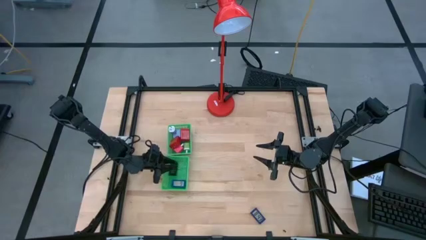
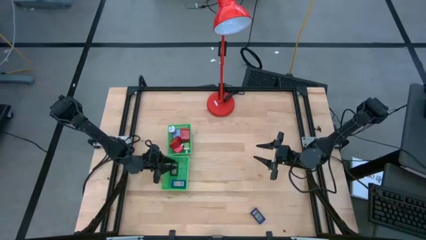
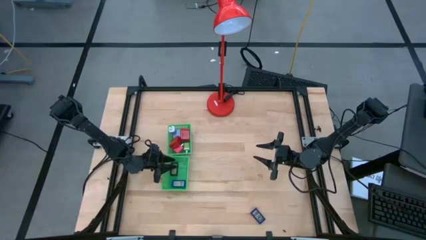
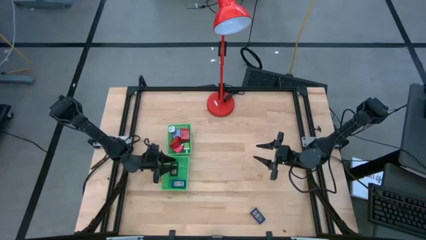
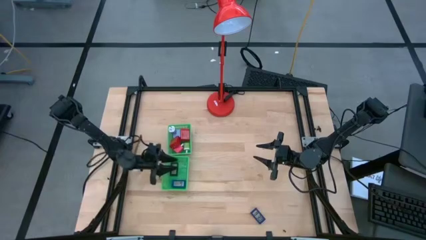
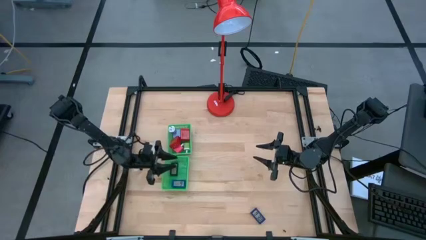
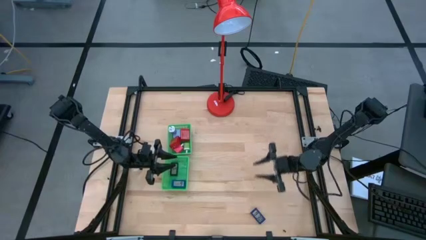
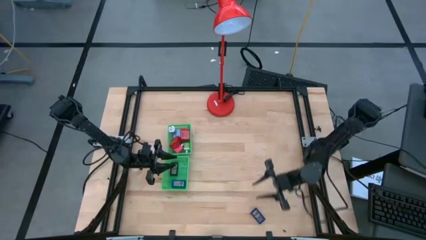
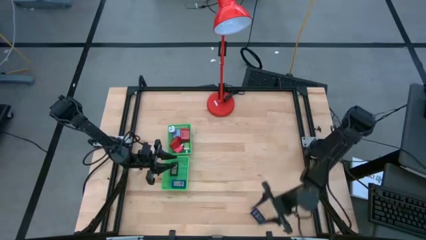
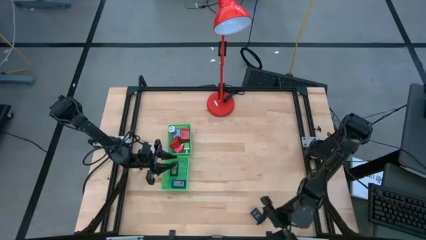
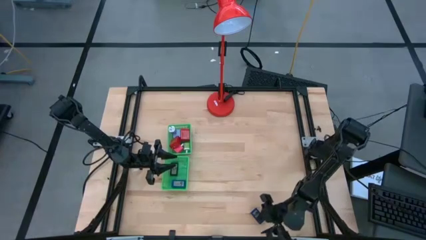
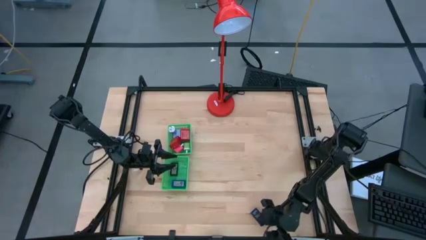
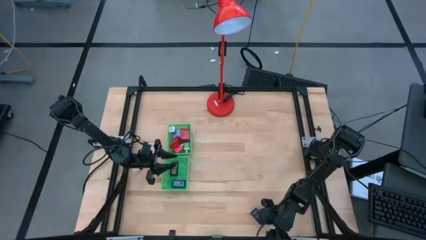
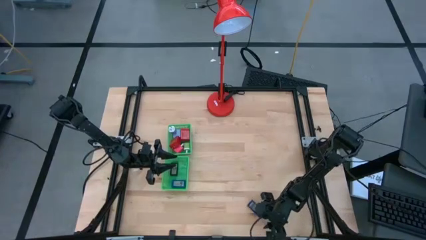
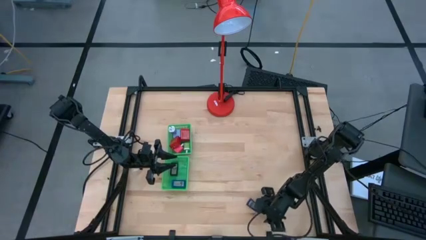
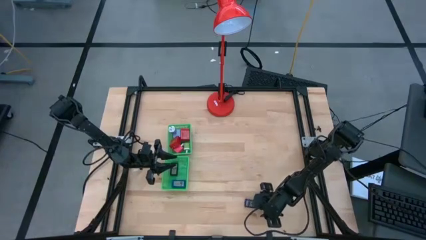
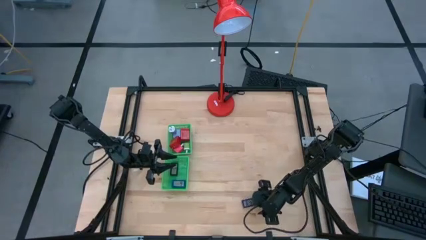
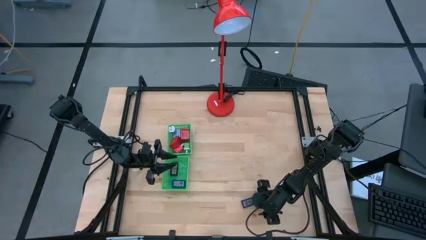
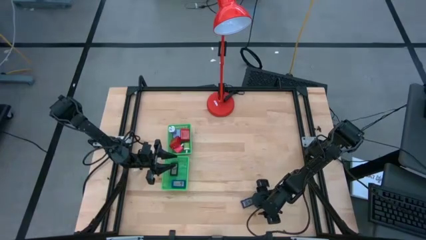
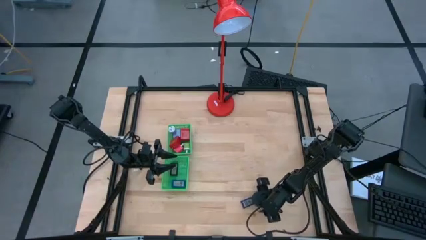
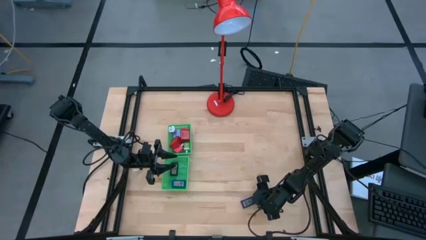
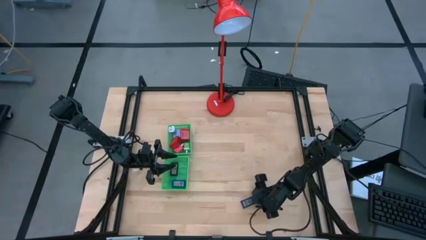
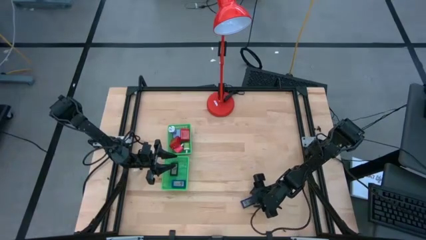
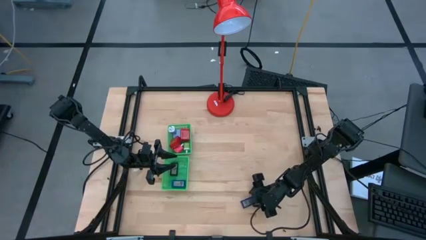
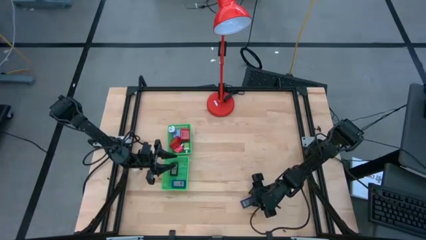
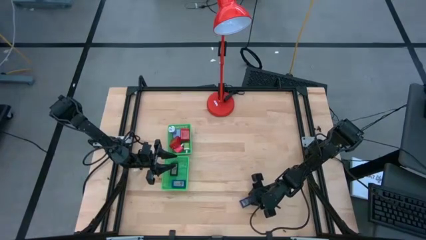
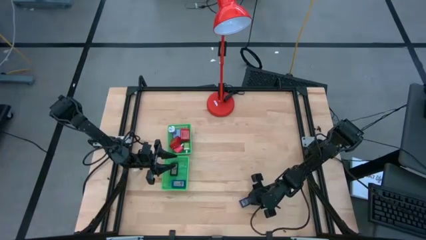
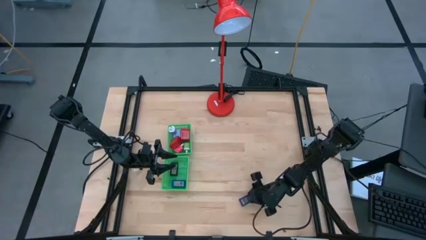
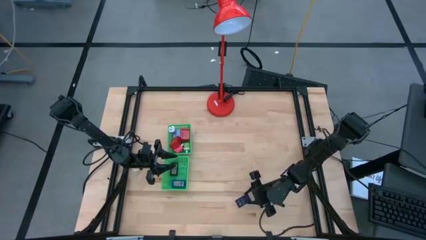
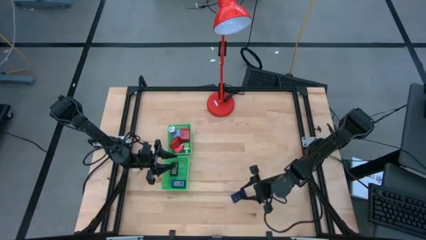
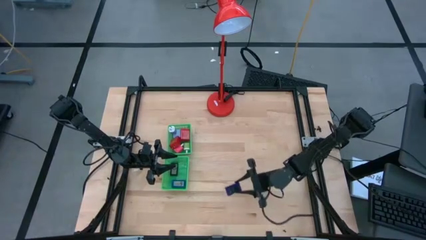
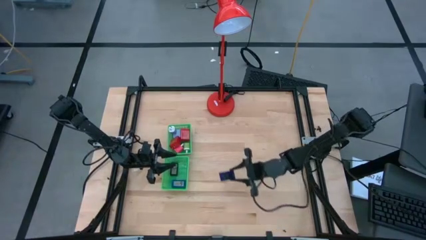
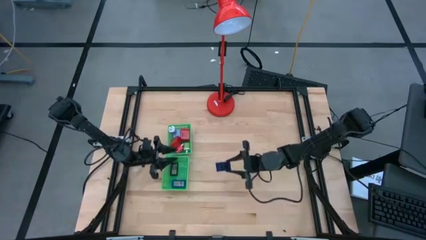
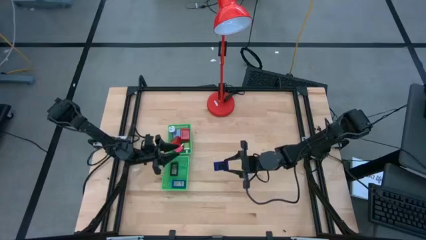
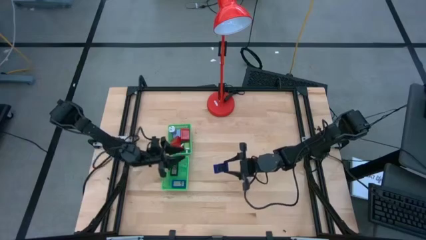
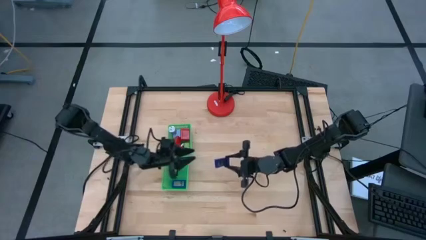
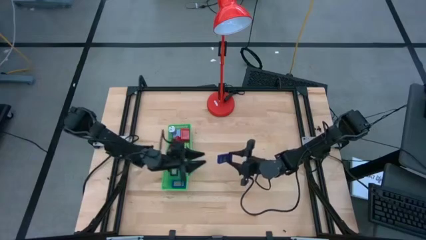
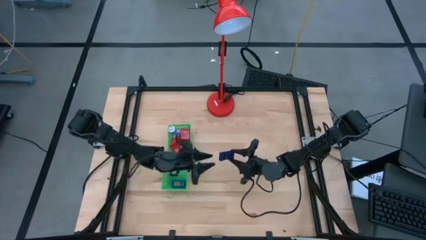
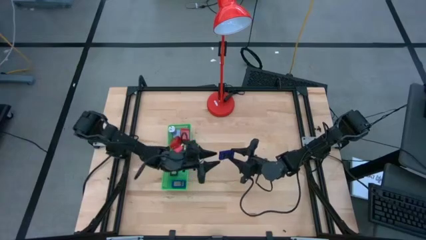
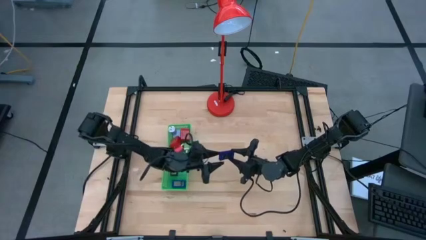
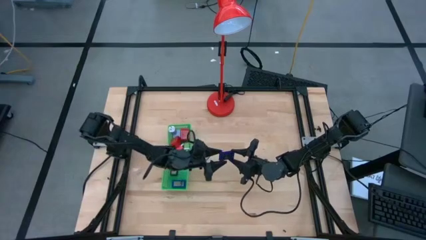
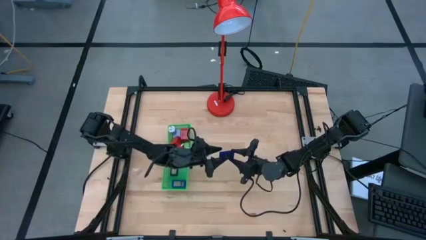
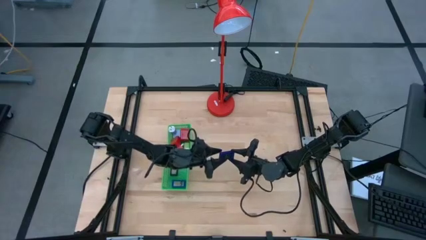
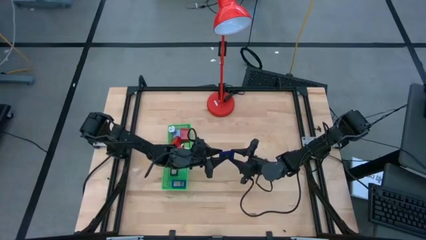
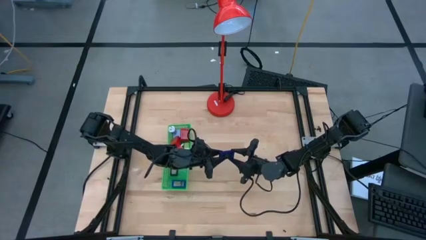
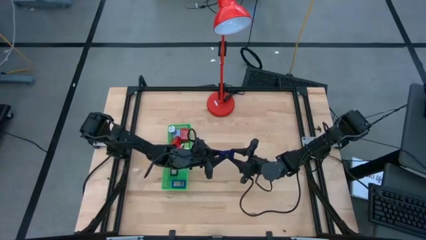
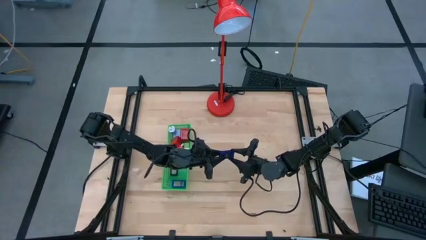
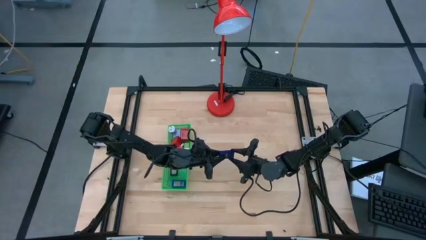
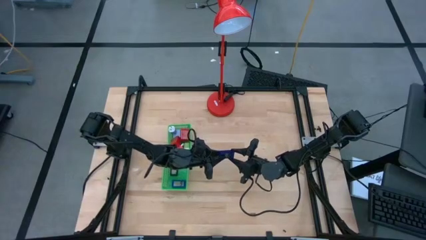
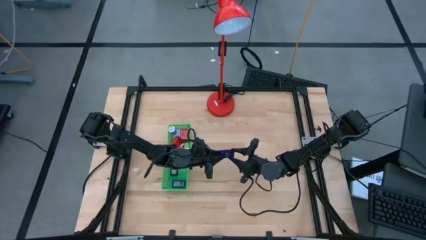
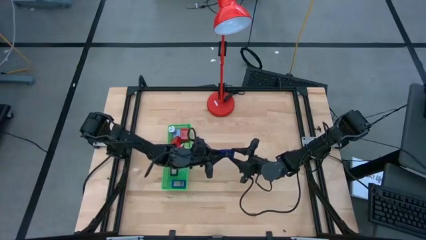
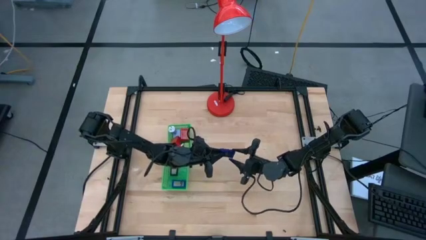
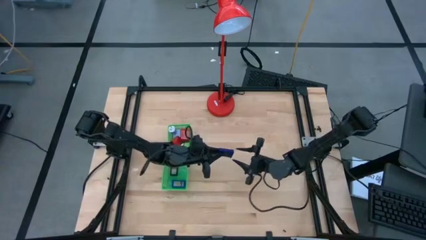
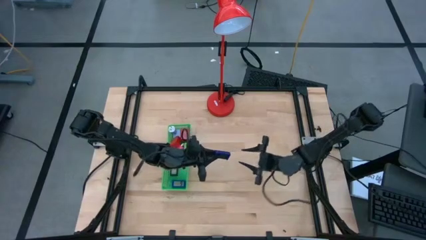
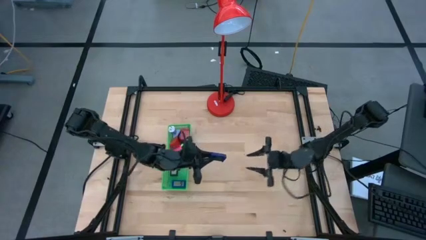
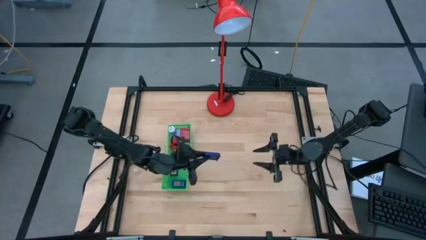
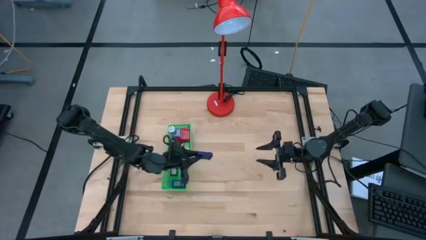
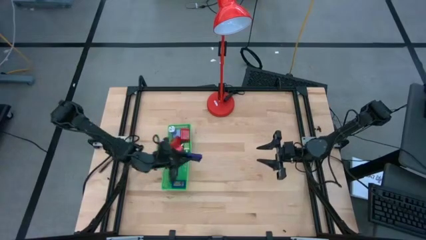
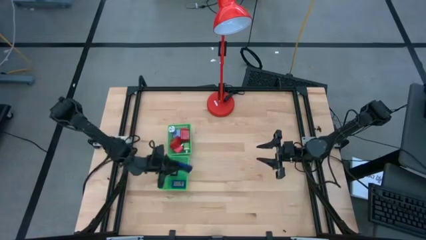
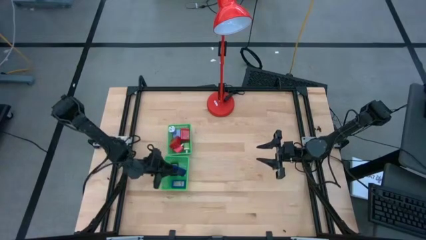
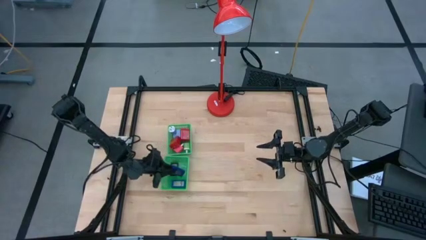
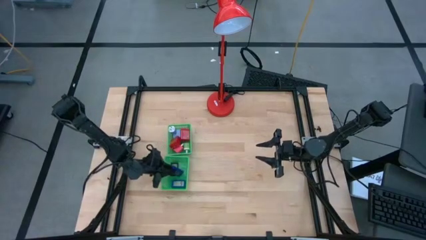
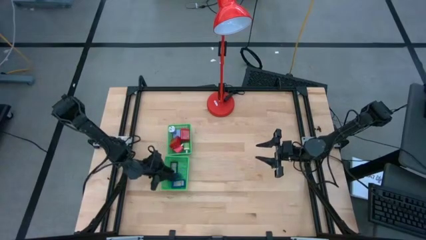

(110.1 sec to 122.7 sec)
Task: Pick & Place Office items
Put the blue digital timer into the bottom green bin

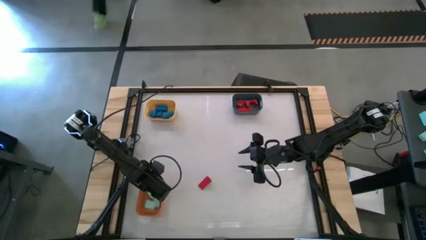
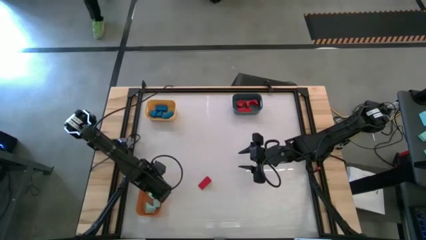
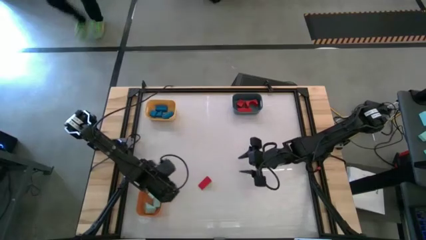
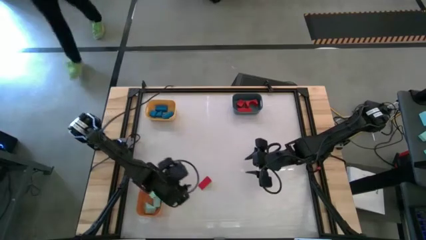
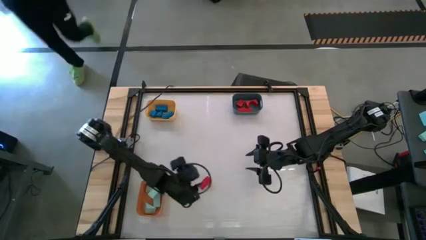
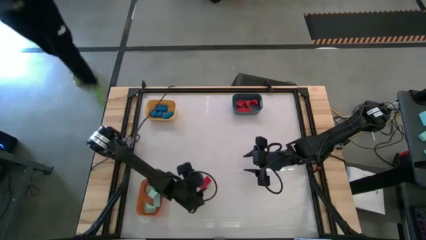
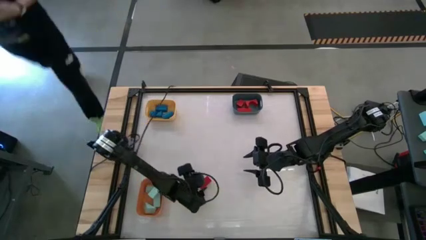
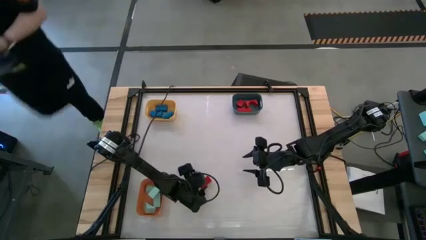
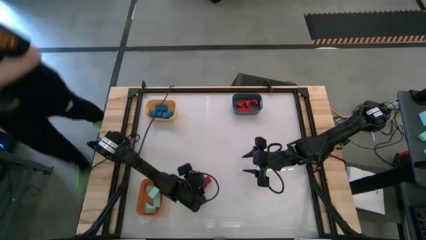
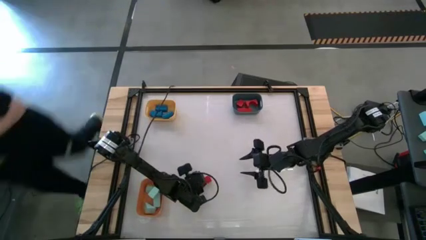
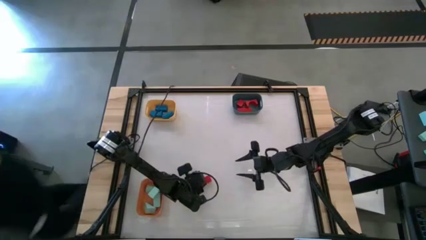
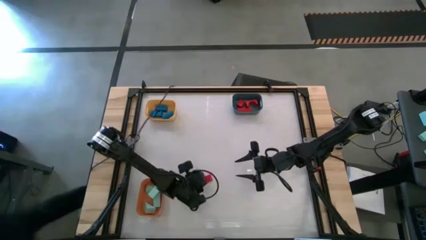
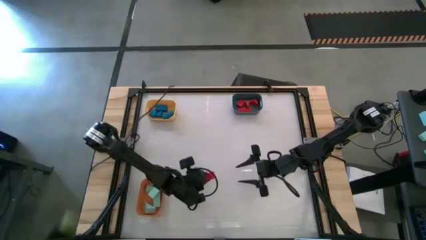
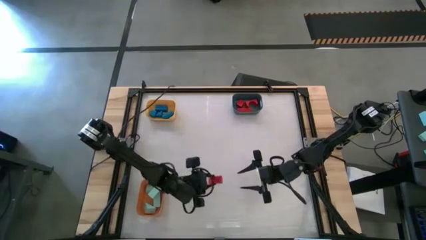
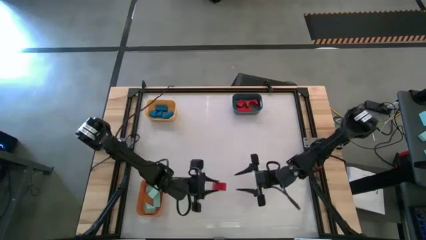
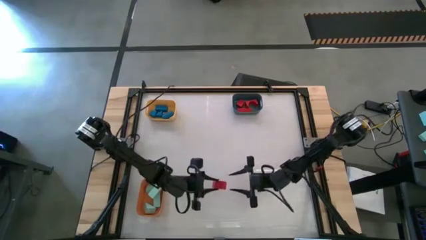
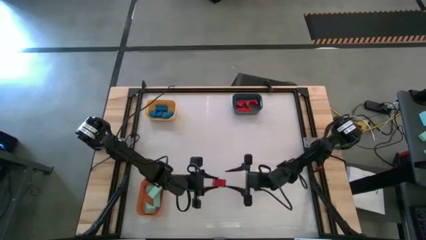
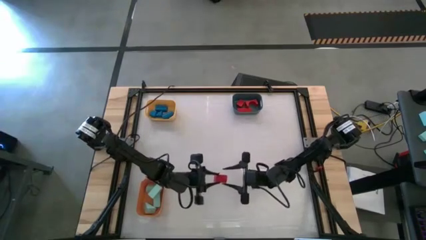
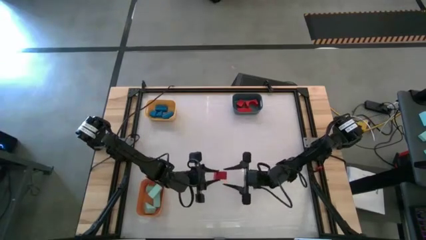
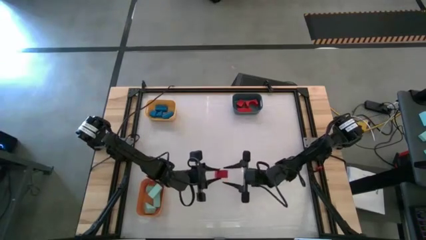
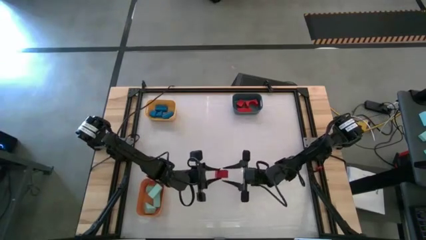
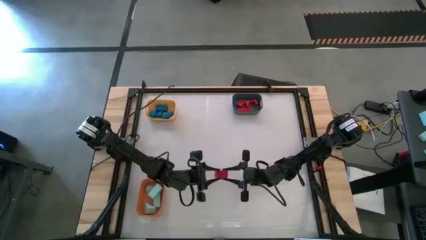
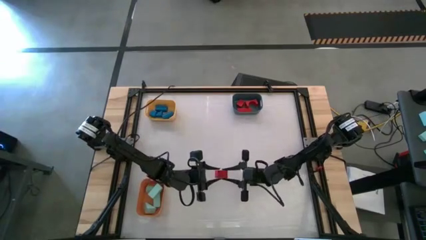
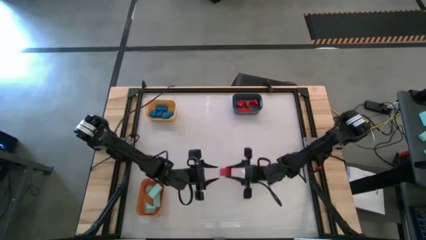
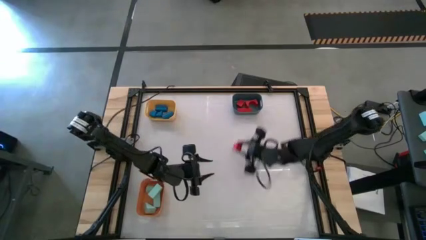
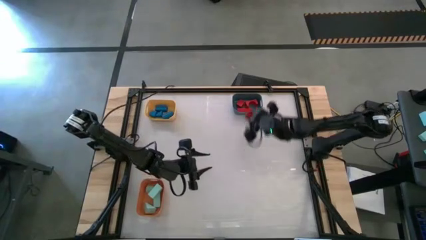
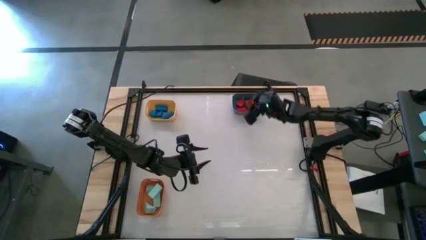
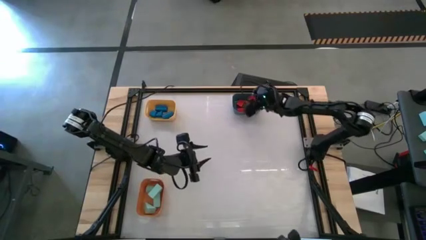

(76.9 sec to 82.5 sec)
Task: Sort & place blocks by color
Put the red block into the blue bin
